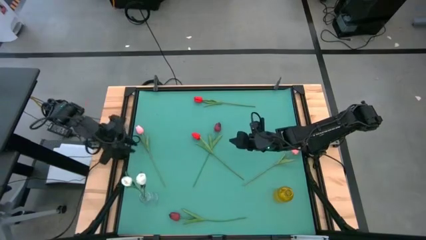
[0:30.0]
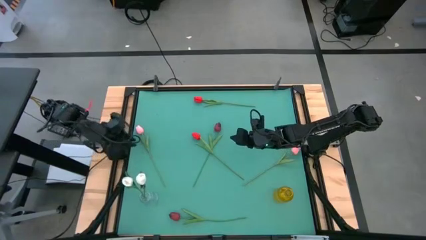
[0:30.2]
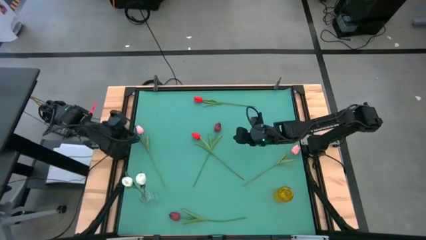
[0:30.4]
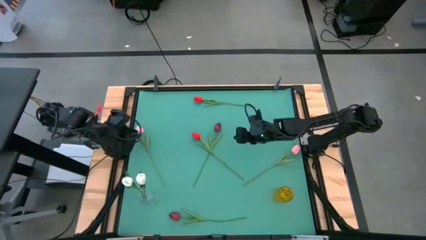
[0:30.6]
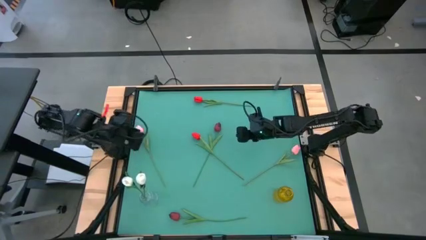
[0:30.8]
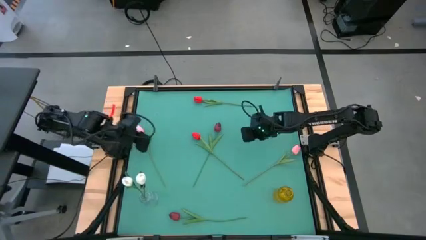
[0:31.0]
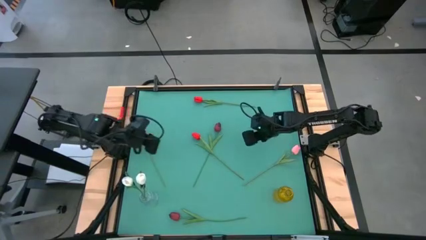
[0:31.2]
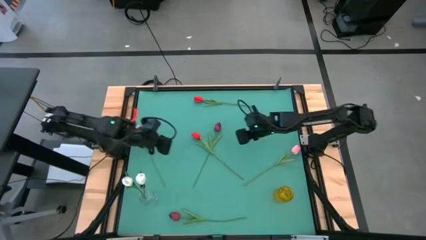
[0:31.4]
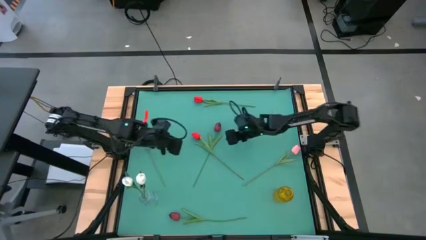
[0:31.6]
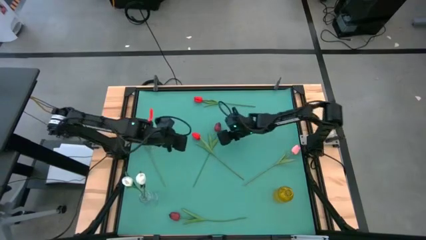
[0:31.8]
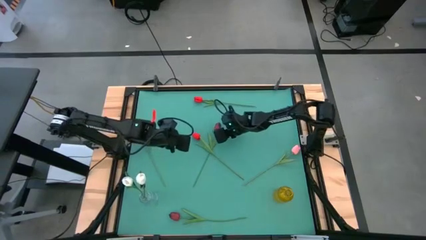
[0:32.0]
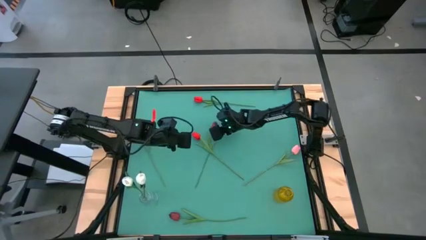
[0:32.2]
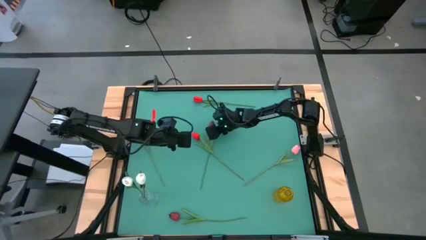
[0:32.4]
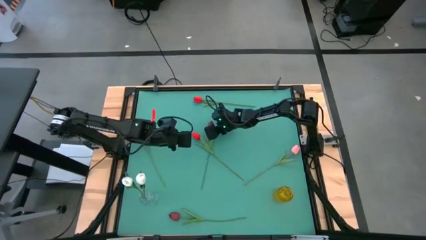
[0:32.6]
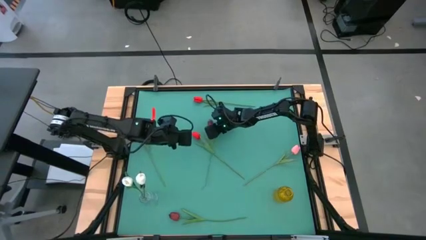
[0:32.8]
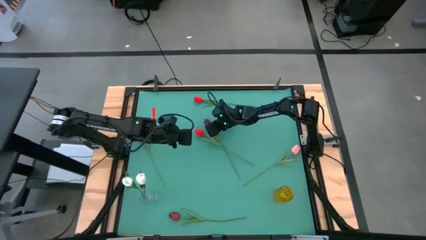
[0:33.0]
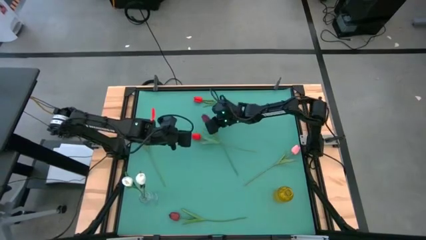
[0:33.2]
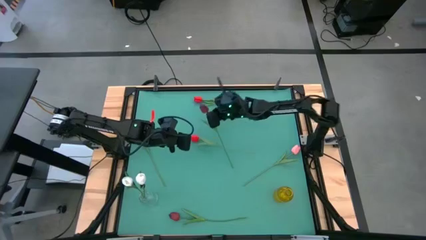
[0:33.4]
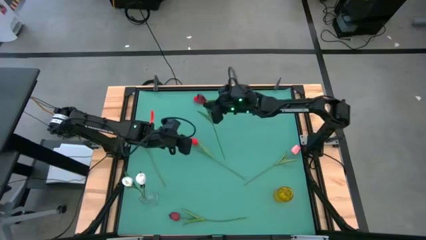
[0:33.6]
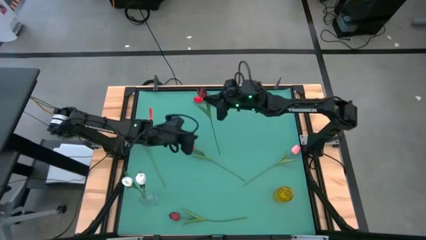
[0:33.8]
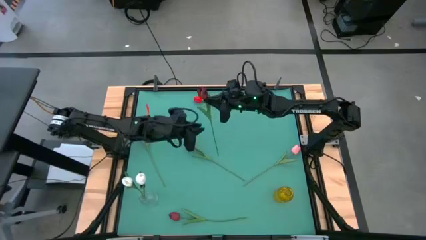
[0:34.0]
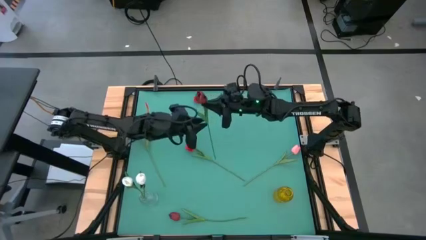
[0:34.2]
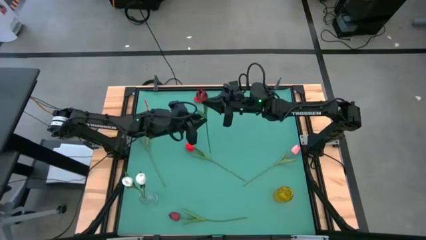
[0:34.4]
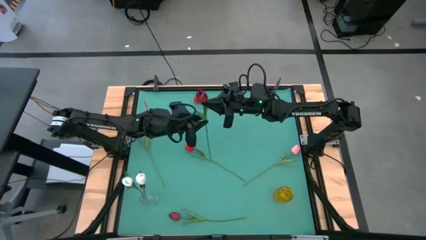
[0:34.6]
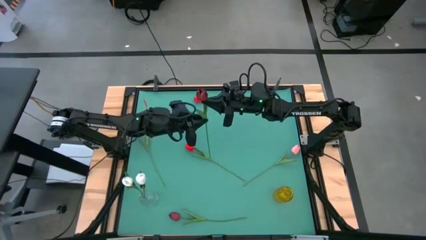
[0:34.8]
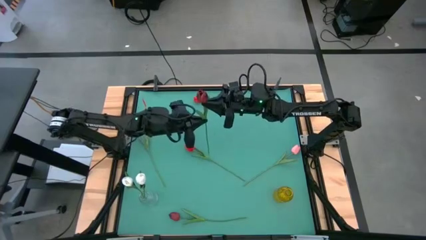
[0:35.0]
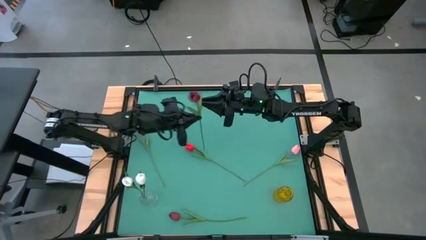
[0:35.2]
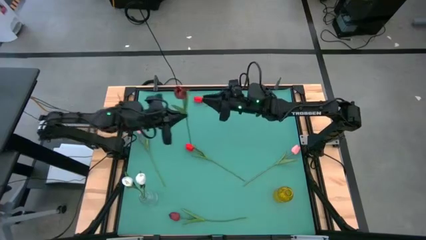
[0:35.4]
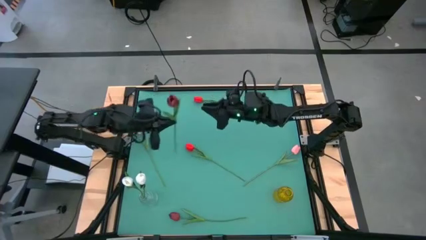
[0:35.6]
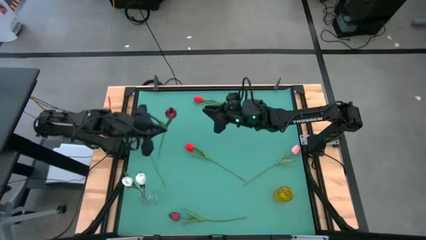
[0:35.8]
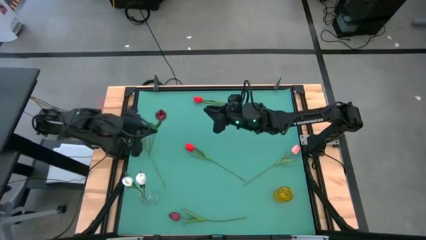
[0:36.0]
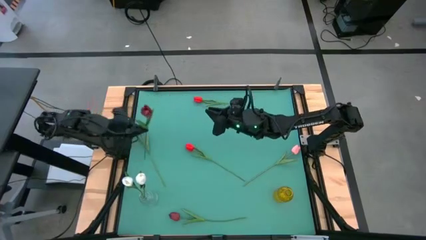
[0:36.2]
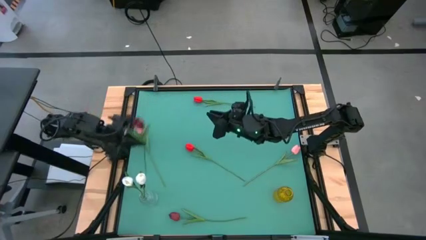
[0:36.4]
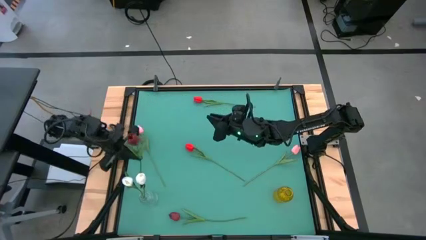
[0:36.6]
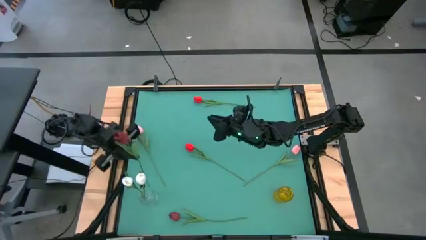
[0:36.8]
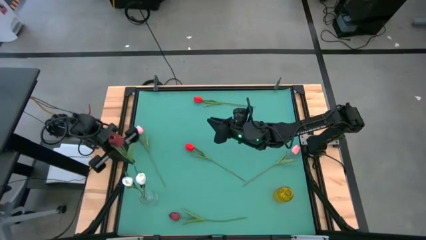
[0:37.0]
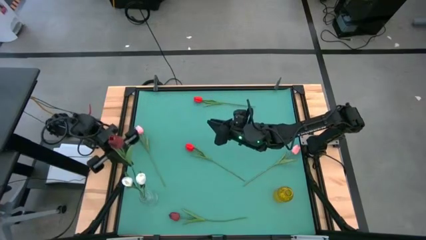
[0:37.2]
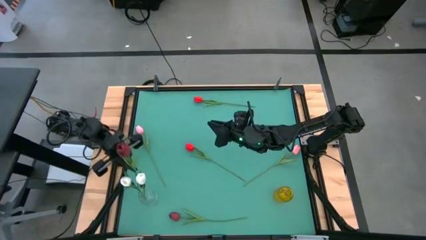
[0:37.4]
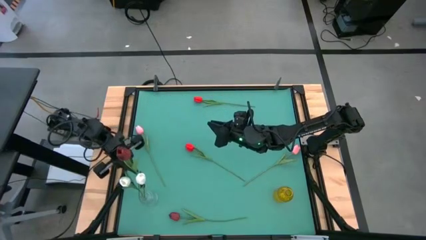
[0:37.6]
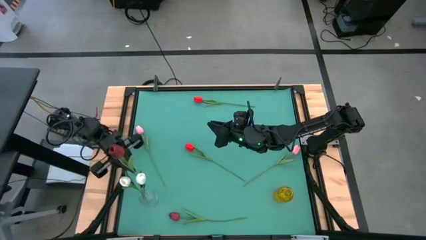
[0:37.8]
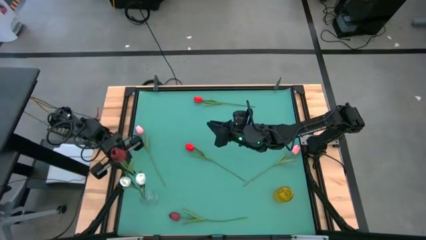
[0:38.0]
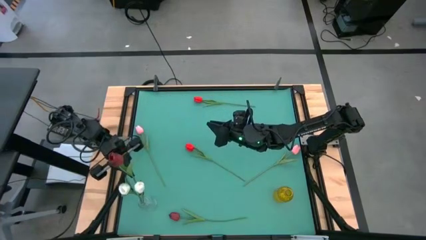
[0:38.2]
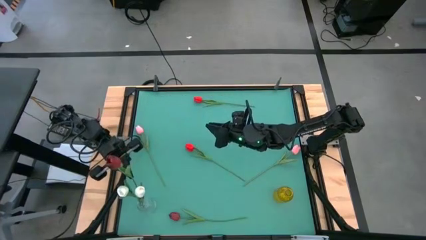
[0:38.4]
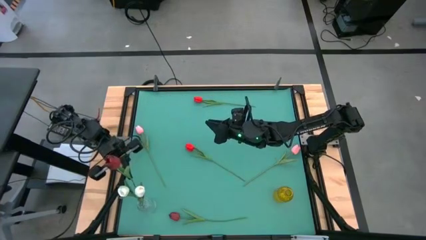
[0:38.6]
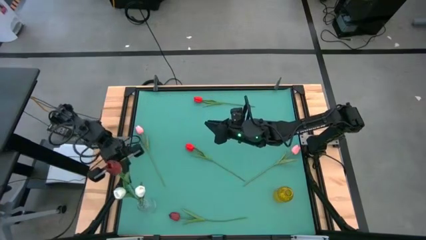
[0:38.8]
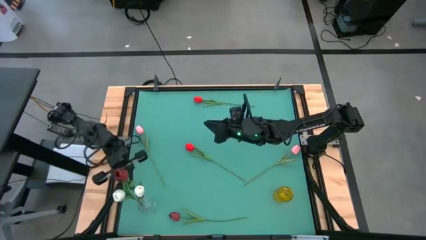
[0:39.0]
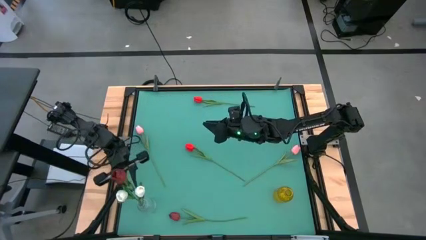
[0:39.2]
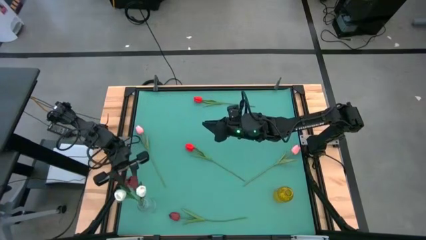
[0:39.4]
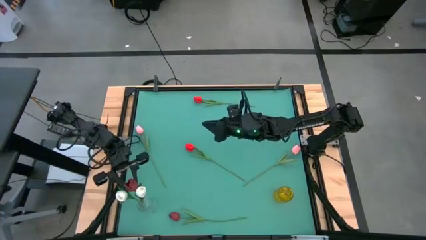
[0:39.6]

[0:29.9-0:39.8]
Task: Sort flowers into vase by color
Put the top dark red flower into the transparent vase

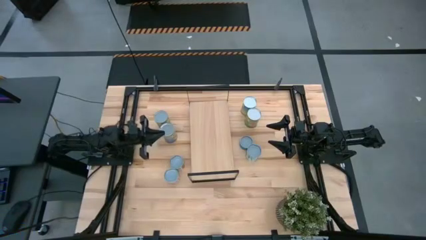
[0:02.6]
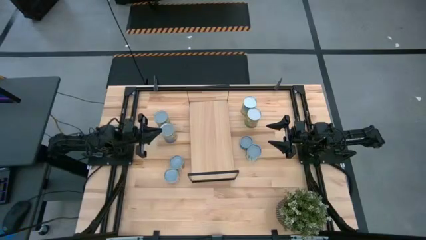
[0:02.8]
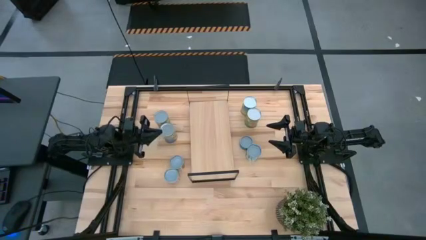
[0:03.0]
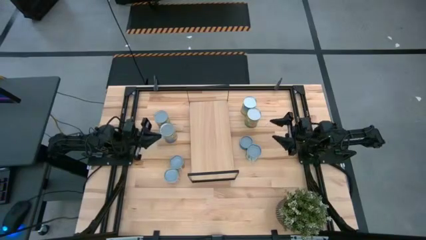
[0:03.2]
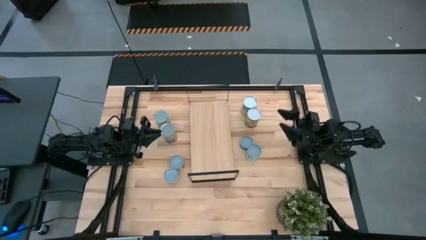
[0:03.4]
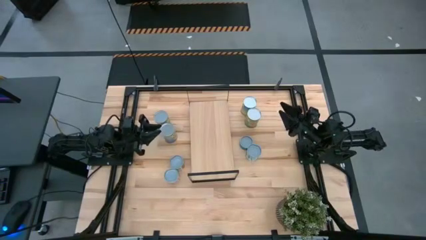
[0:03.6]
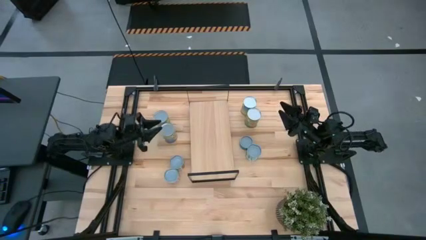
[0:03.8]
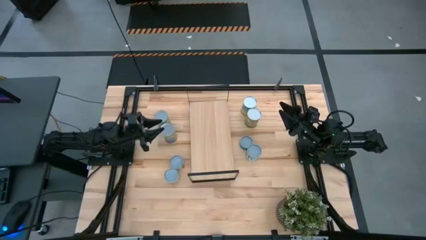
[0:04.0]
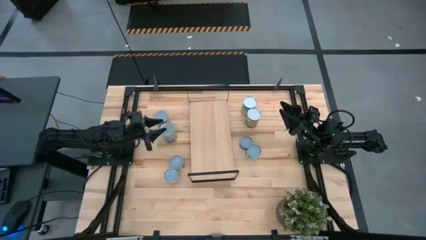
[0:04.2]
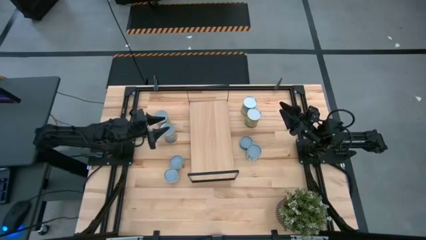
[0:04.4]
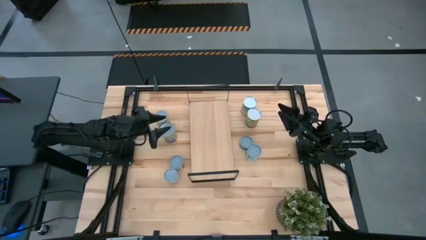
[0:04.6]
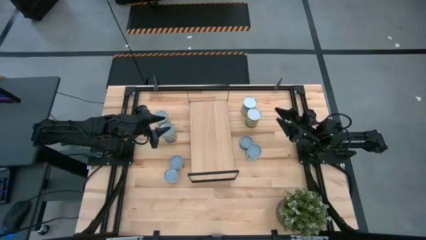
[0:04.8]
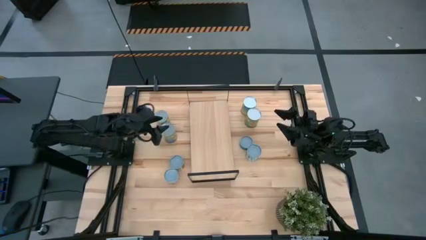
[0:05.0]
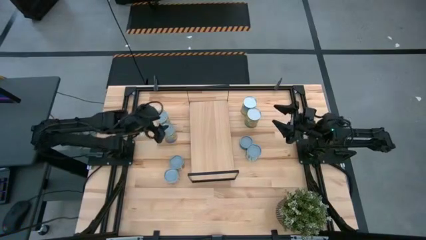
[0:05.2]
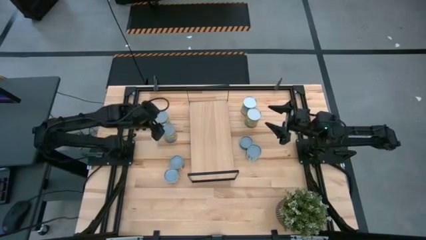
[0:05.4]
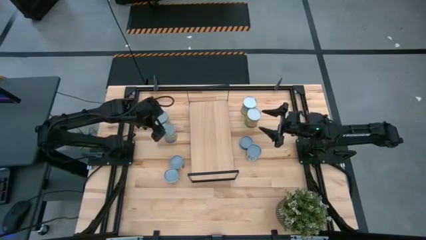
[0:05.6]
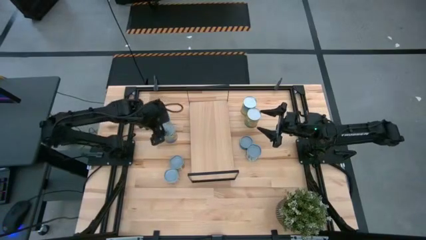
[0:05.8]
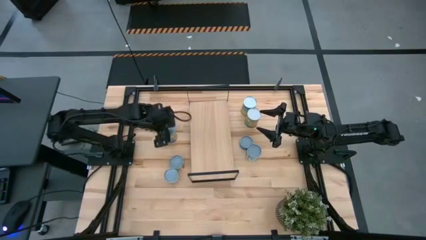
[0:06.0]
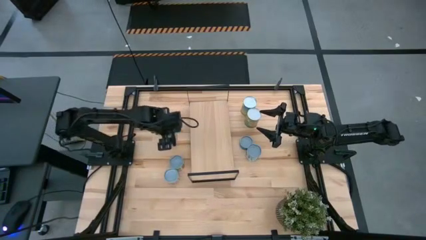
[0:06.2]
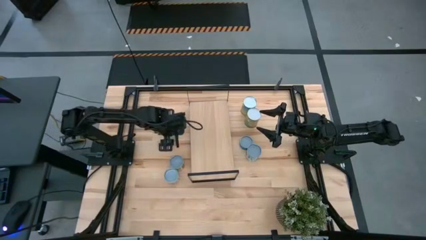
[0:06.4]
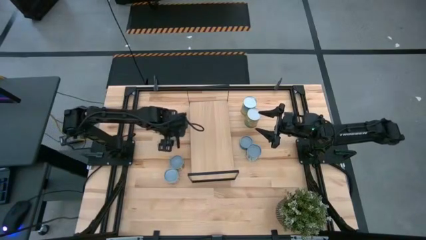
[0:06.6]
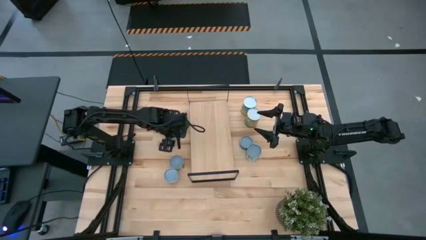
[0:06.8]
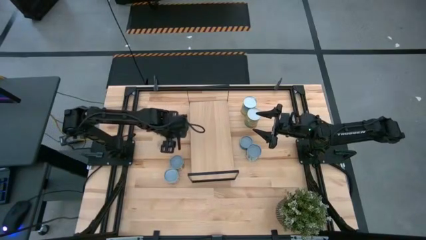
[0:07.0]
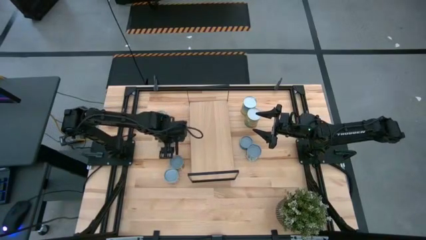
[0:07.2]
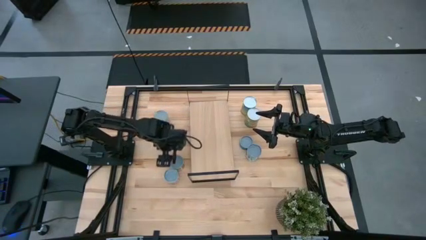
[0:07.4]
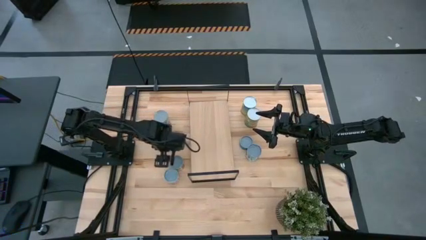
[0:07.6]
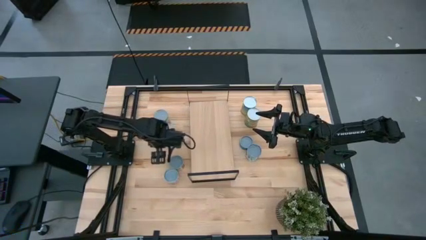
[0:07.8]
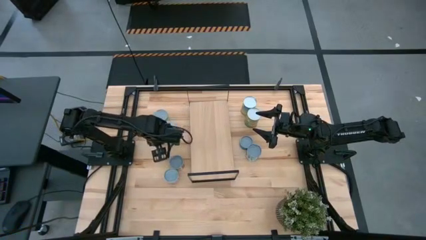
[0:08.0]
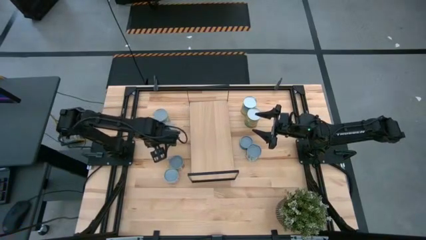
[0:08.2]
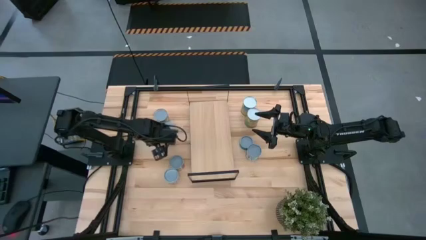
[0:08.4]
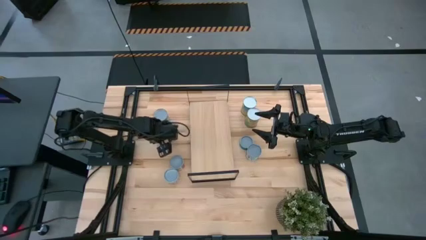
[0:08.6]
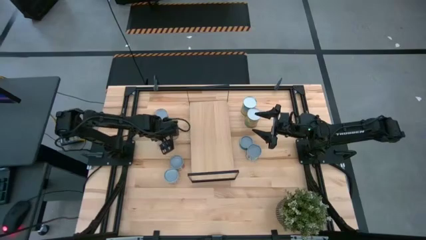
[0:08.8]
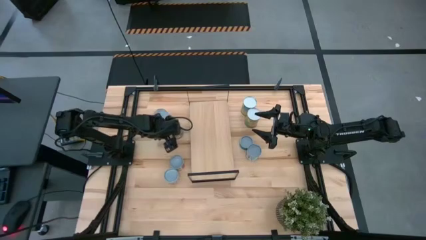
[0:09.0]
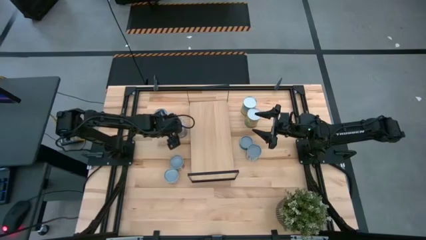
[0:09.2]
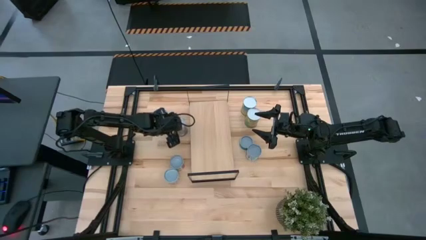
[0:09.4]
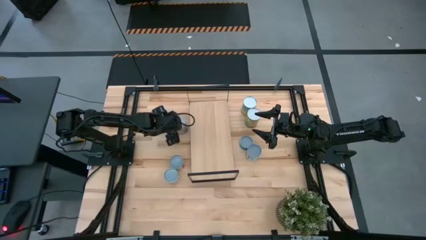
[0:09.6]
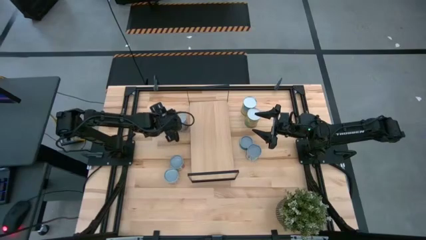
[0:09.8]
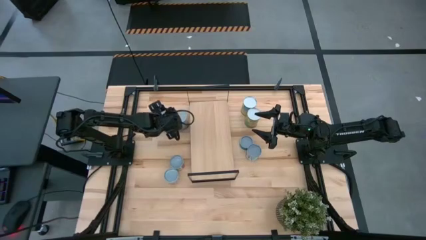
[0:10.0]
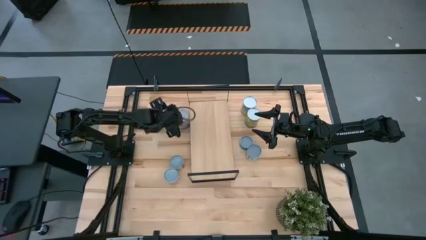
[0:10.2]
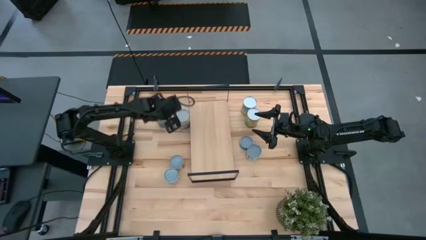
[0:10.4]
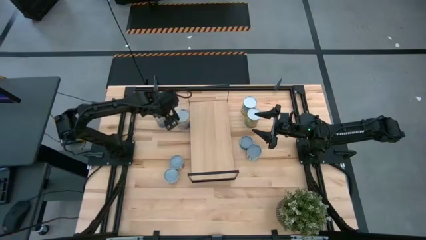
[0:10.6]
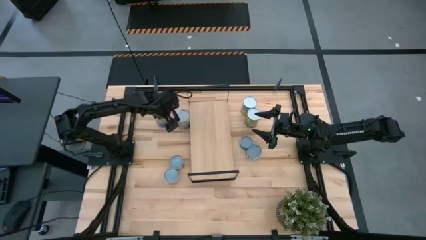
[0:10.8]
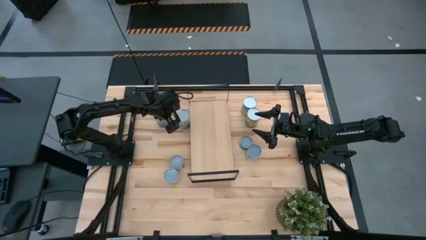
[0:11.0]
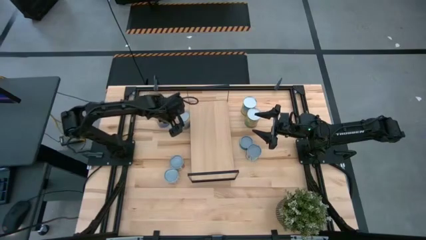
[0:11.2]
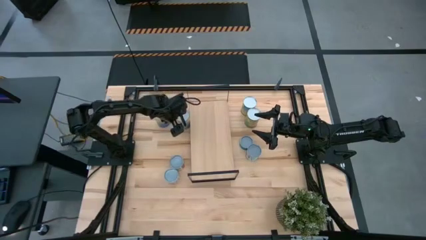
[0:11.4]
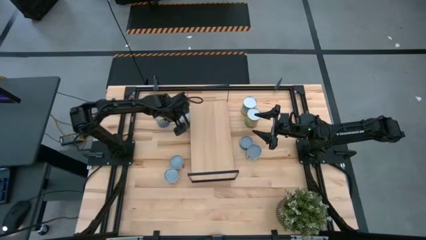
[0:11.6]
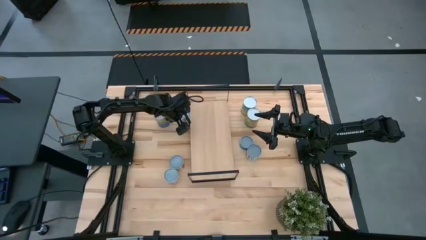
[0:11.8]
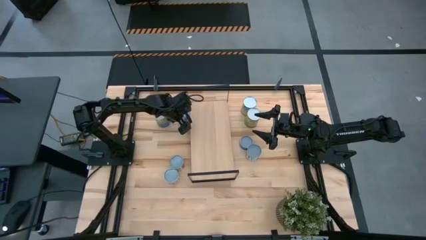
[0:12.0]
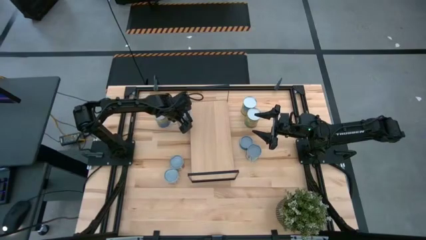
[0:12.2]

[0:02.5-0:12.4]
Task: Pick and place cans onto a shelf
Put the canned peaches on the shelf
